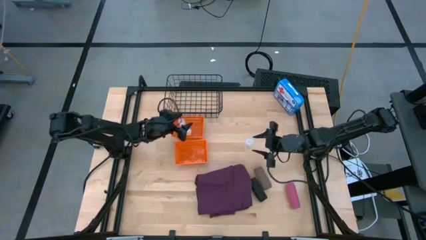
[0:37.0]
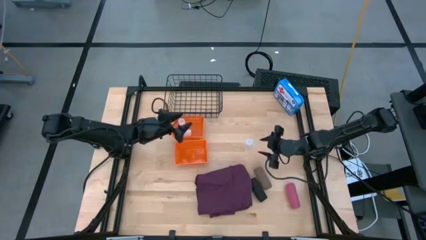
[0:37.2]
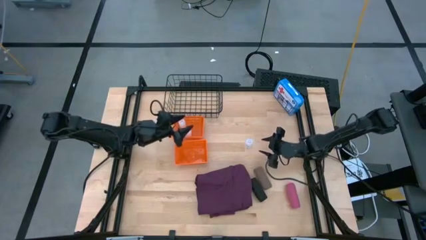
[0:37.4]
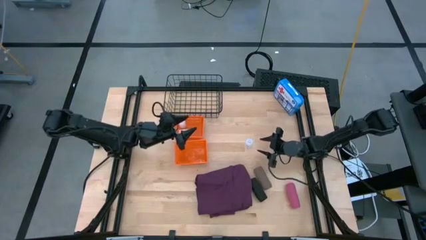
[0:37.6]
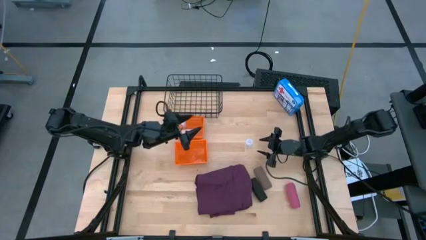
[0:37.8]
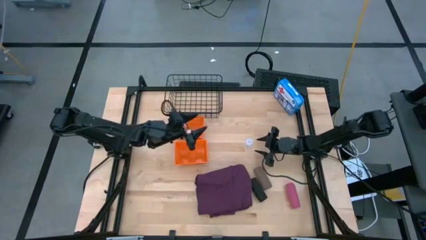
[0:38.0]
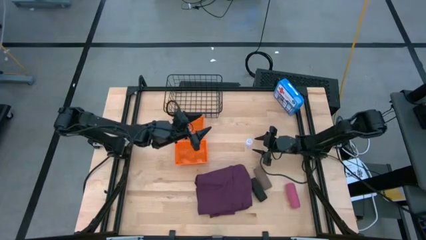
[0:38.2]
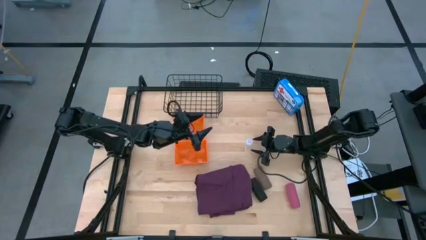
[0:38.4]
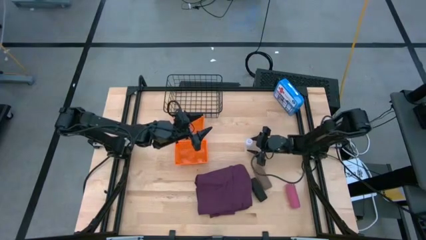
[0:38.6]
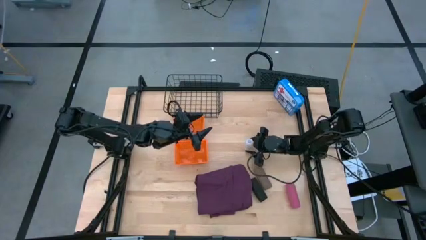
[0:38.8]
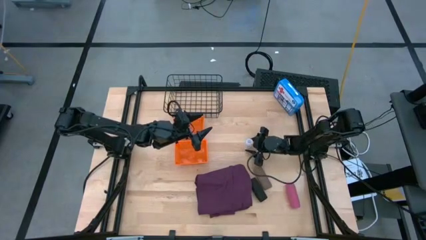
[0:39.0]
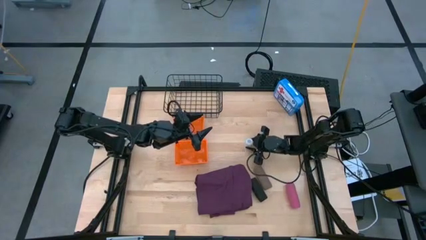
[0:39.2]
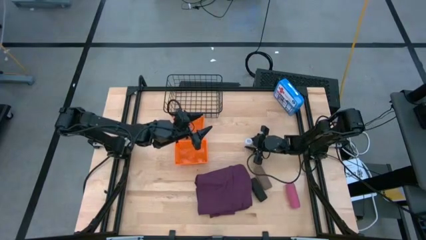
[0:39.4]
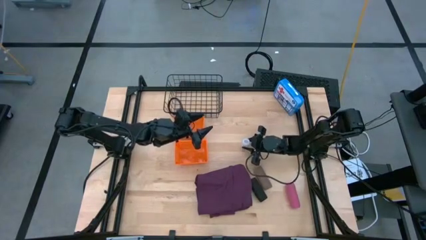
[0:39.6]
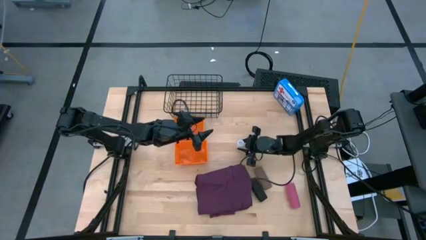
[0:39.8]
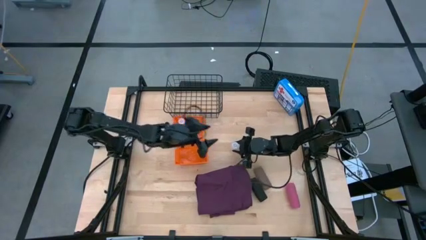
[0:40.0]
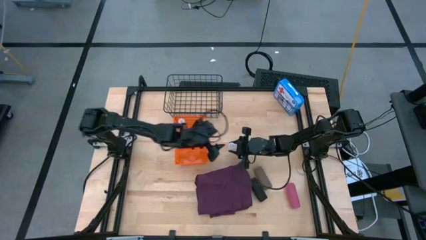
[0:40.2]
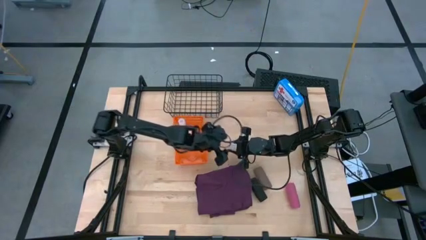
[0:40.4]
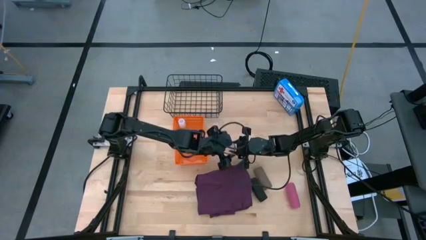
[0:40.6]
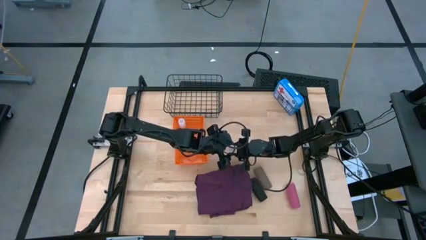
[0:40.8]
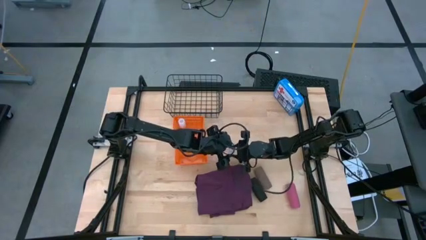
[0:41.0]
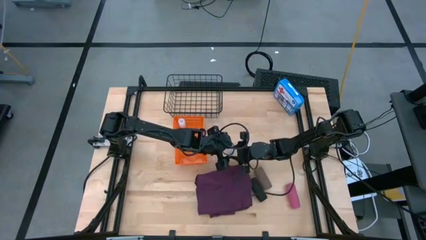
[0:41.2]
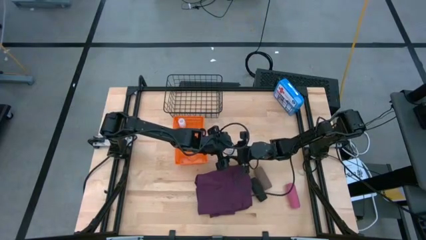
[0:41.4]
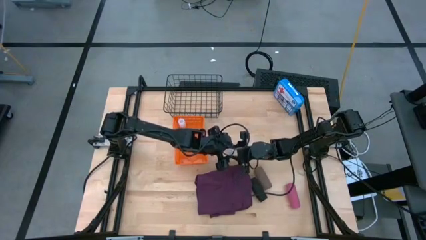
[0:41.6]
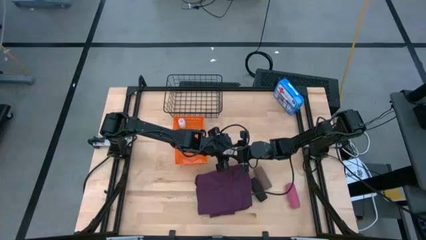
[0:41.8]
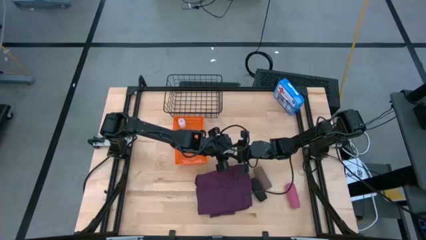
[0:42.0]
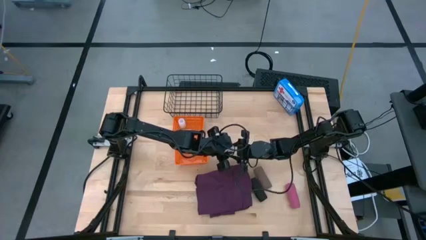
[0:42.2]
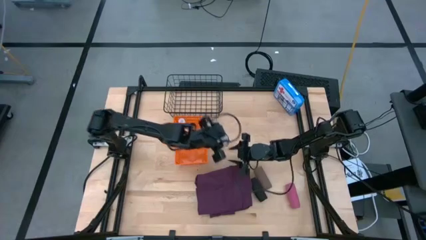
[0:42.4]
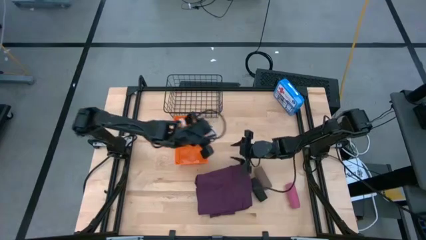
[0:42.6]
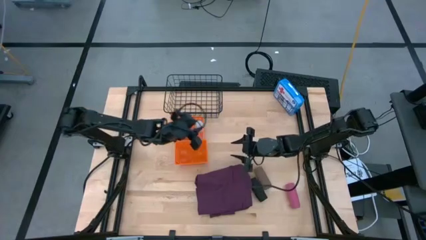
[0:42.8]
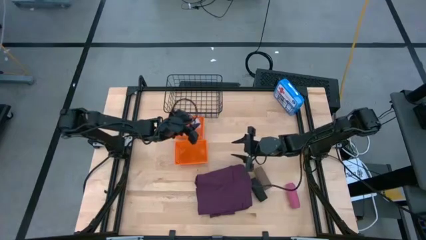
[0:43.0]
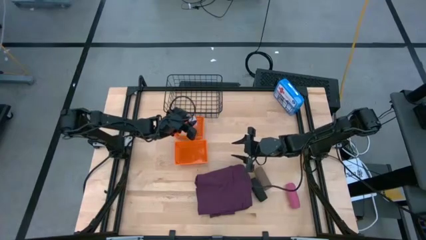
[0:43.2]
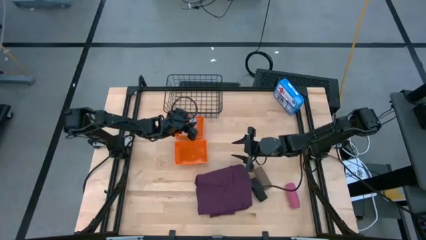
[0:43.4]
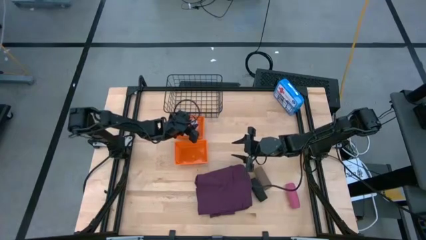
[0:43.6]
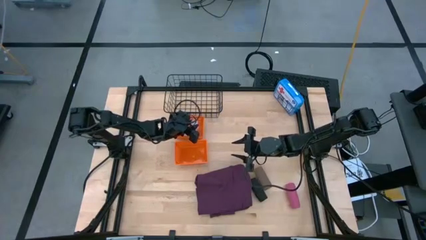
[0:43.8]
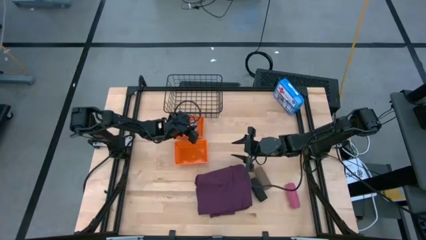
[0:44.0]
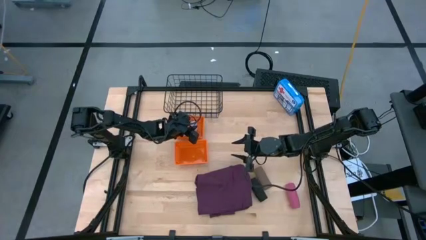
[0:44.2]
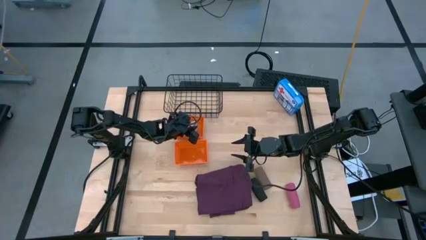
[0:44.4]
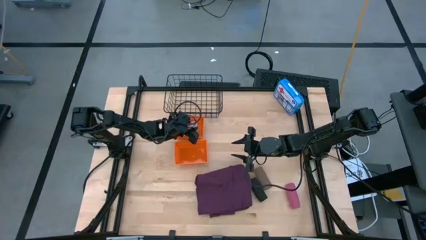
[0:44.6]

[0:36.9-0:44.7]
Task: Pick & place medical supplies in basket/bin
Put the white pill bottle into the top orange bin

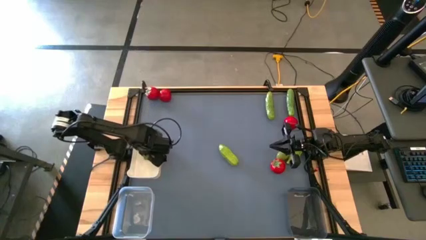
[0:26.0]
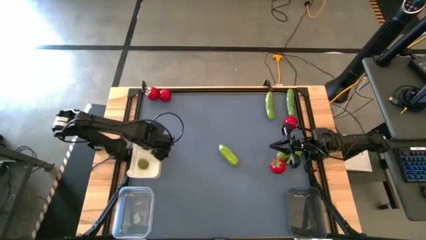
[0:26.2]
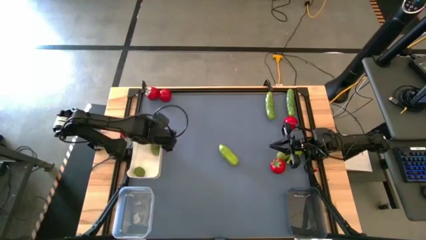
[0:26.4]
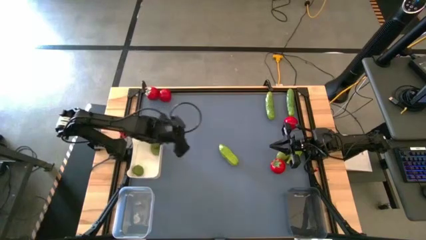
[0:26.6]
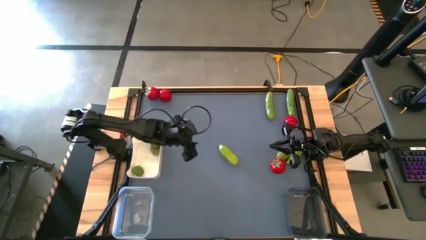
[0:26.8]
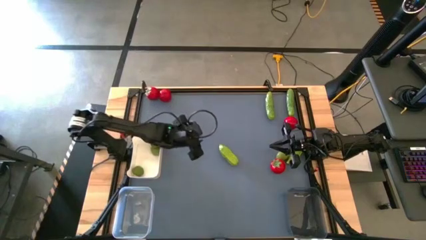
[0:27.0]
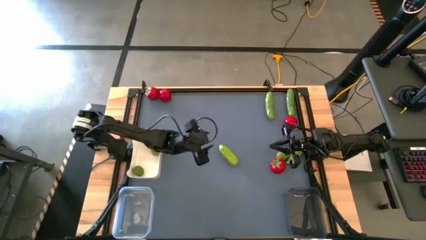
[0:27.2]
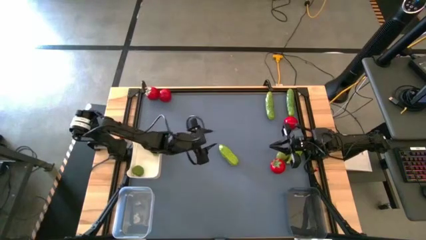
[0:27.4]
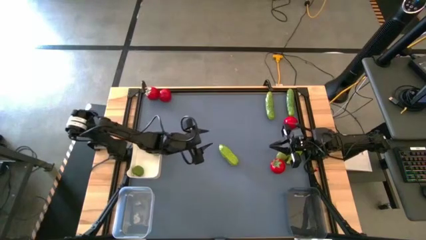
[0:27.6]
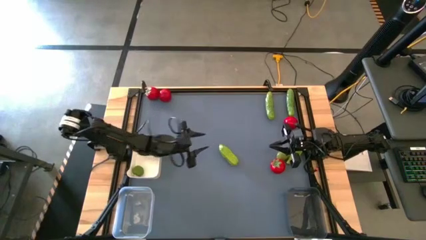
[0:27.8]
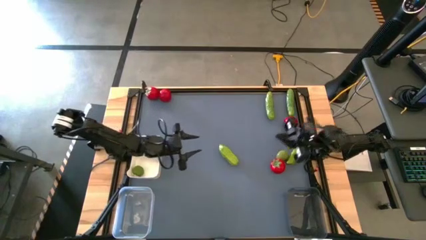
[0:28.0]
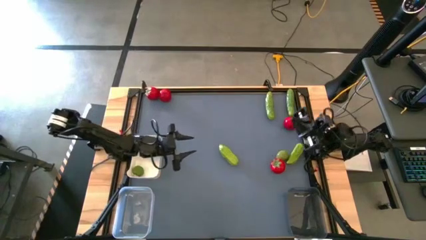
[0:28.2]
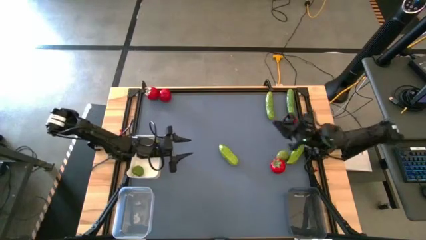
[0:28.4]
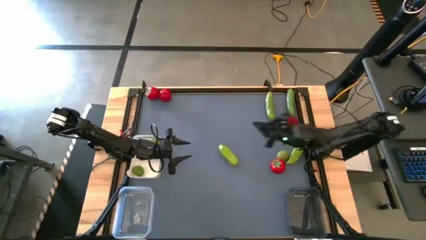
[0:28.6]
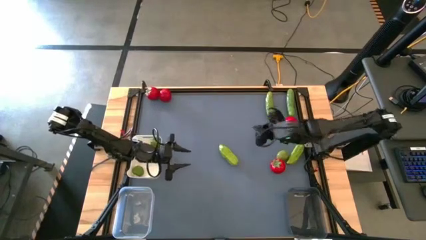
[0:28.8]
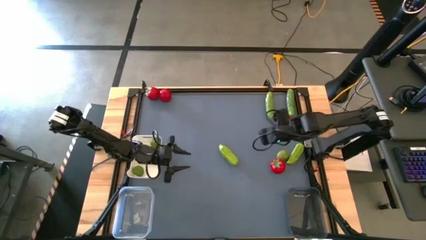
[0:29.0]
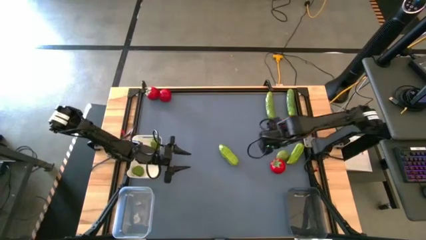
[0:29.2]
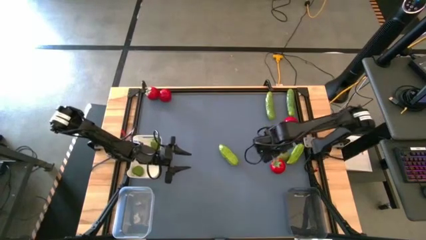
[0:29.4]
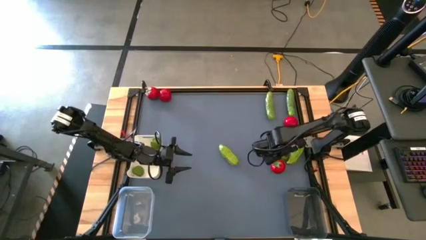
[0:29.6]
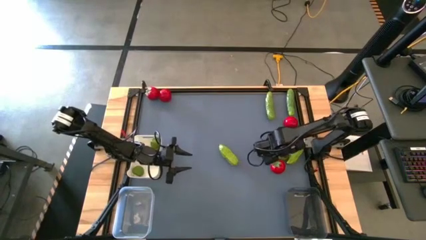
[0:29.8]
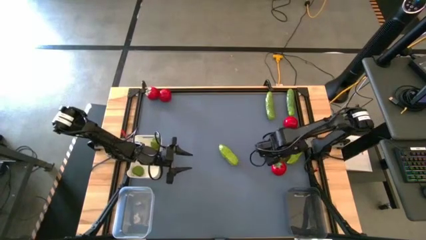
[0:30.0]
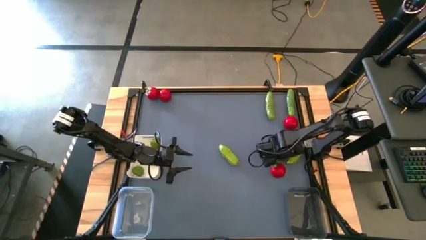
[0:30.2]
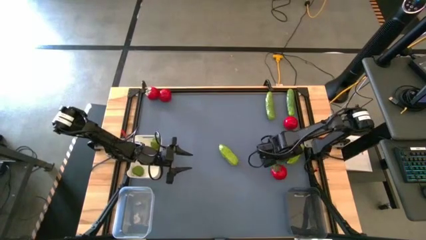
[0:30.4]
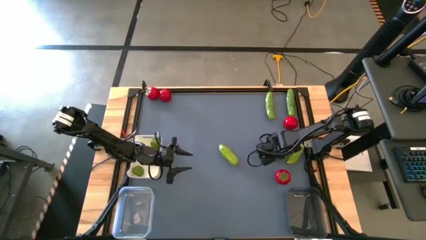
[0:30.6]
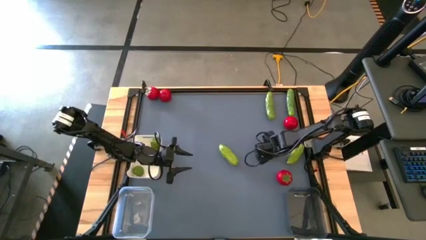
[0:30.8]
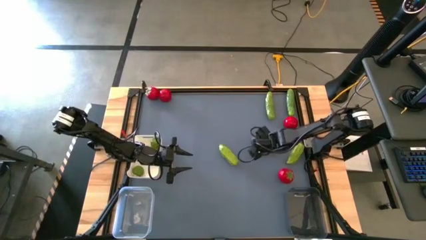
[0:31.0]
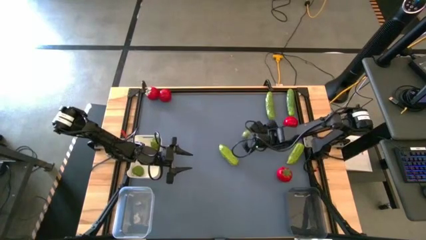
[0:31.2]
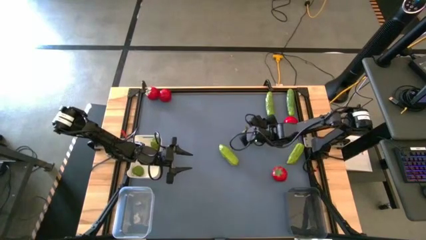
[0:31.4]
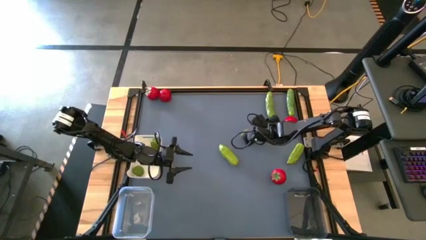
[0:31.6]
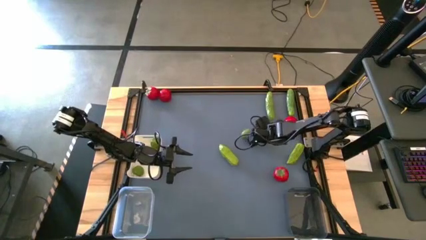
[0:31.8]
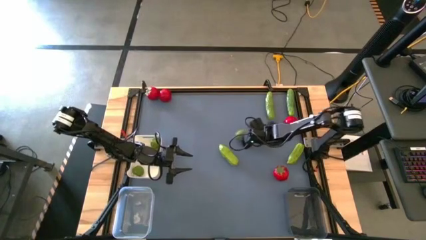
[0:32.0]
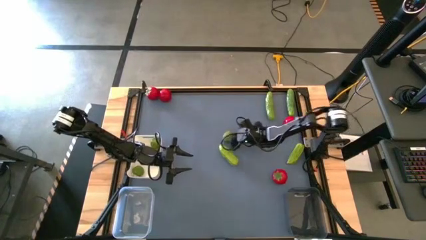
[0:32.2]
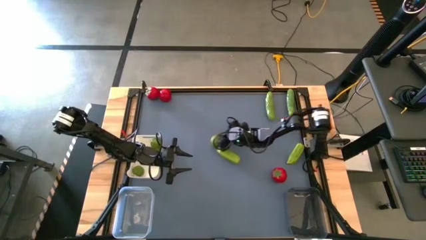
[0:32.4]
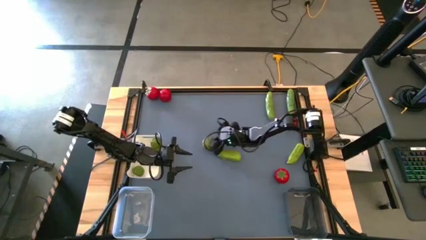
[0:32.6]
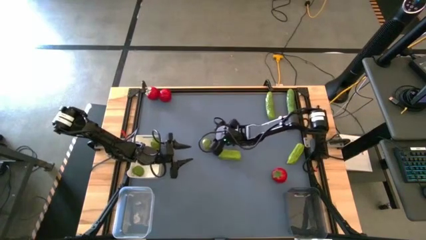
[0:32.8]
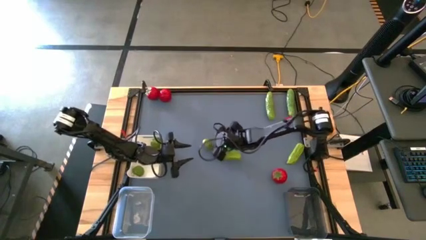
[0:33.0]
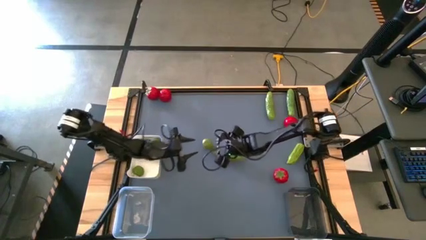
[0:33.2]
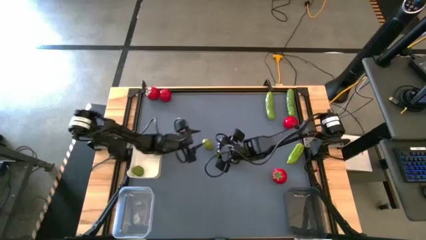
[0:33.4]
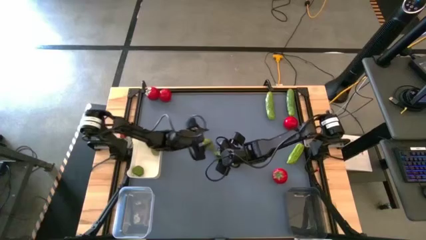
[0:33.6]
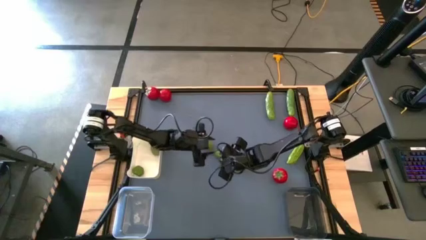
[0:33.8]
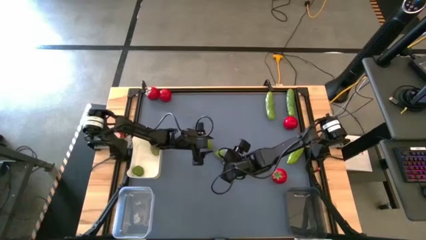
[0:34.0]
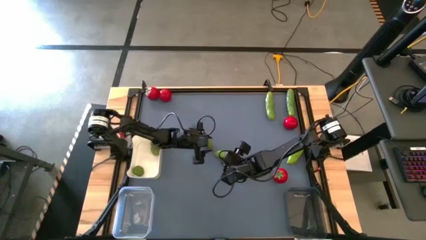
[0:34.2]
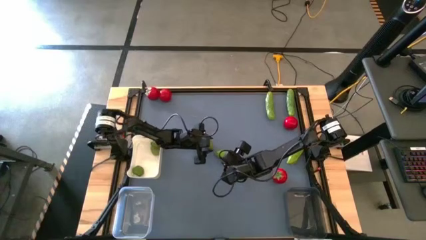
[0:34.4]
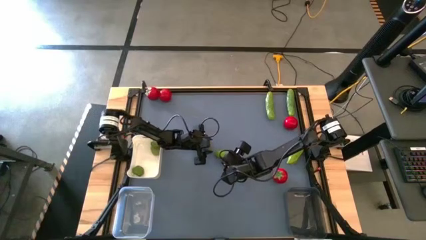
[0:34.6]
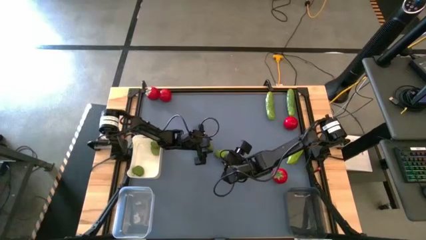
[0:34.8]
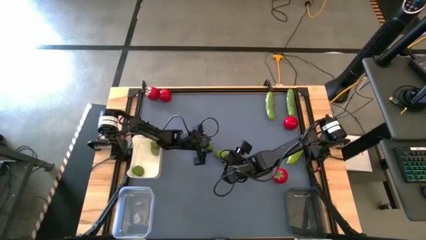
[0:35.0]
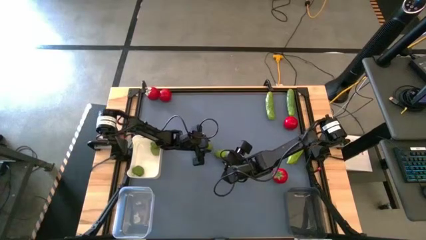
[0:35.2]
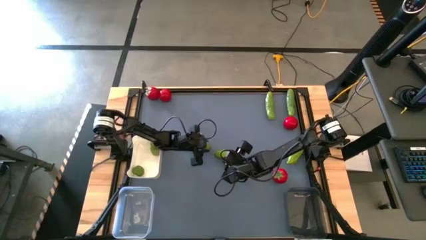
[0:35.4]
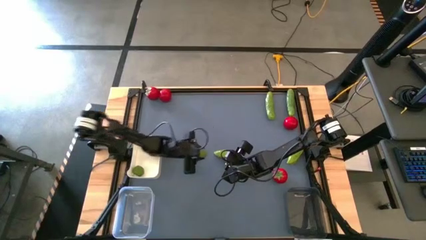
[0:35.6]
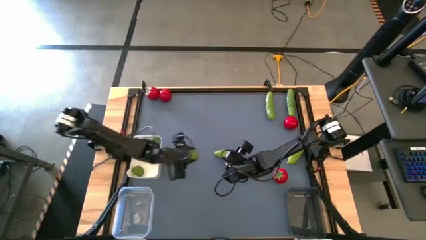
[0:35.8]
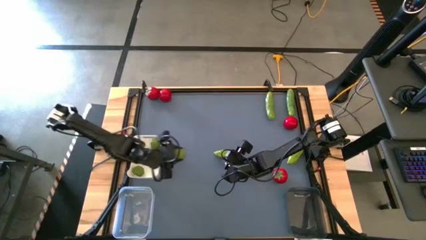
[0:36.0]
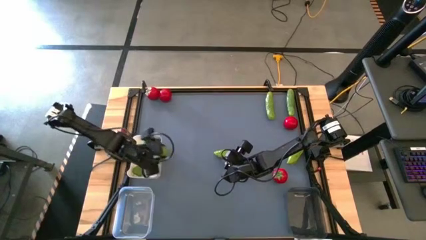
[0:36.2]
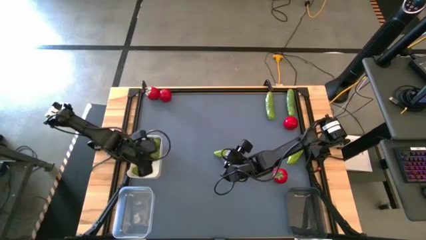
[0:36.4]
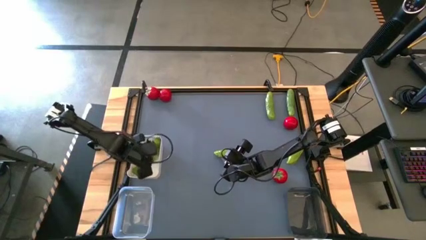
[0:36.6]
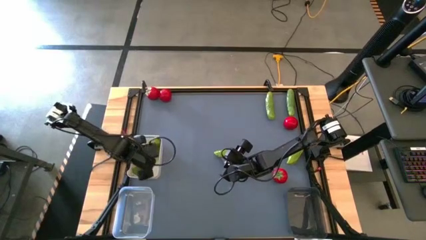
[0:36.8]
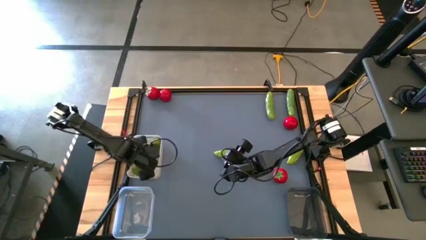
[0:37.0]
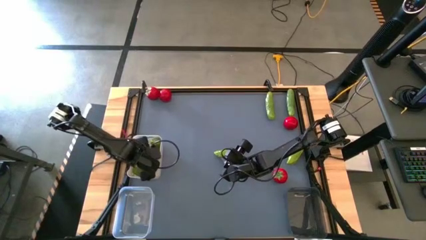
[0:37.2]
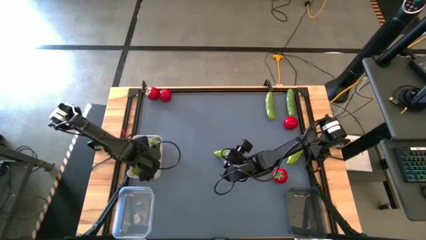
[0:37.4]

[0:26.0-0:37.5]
Task: Sort produce into baskets
Put the green lime into the white bin
